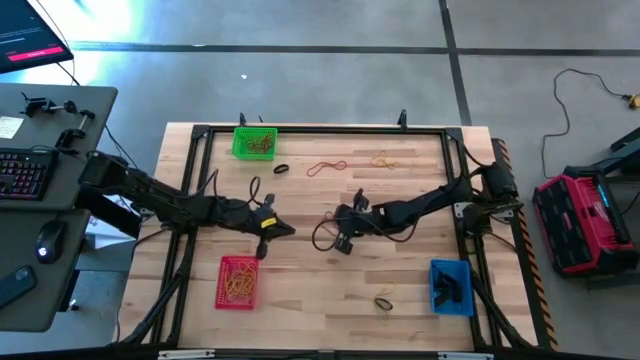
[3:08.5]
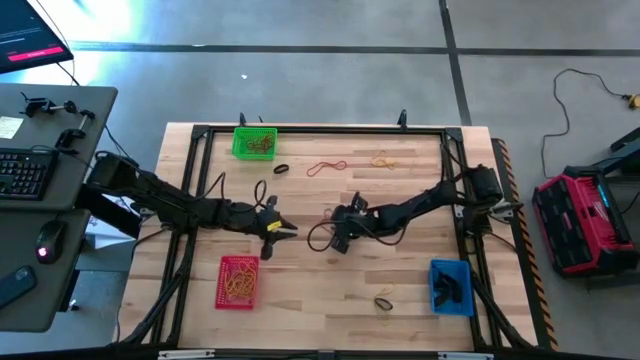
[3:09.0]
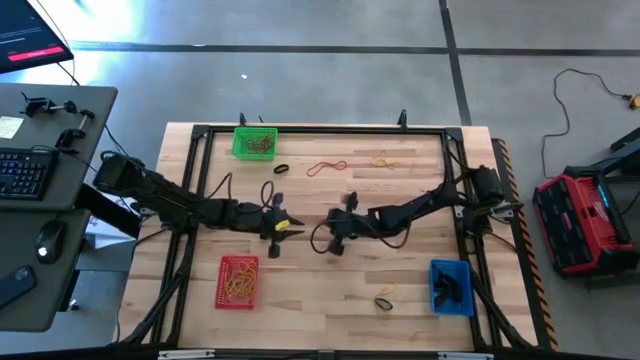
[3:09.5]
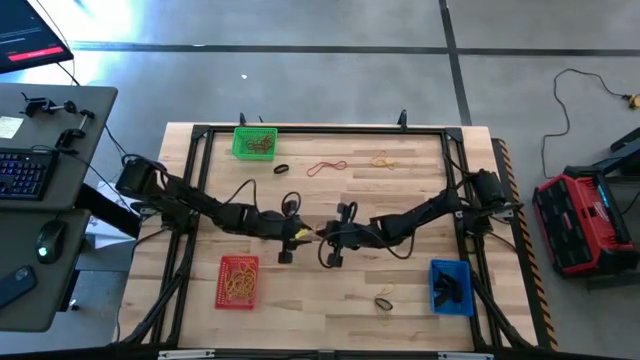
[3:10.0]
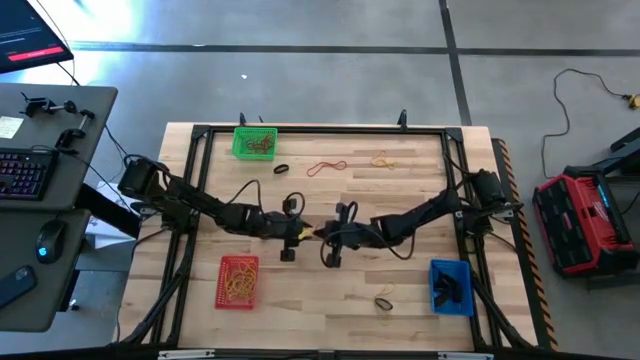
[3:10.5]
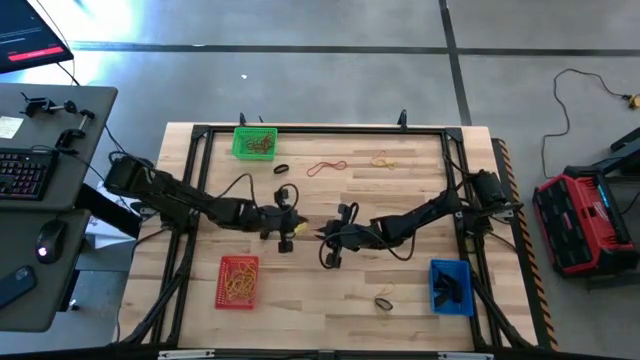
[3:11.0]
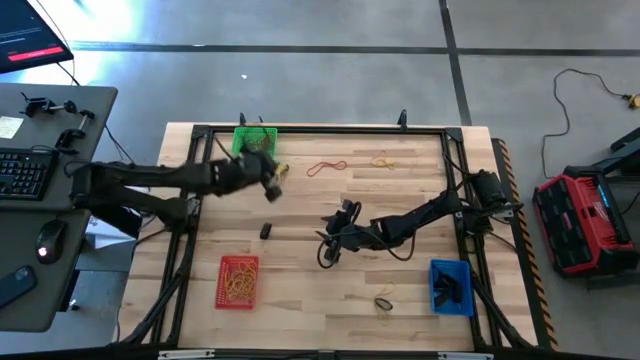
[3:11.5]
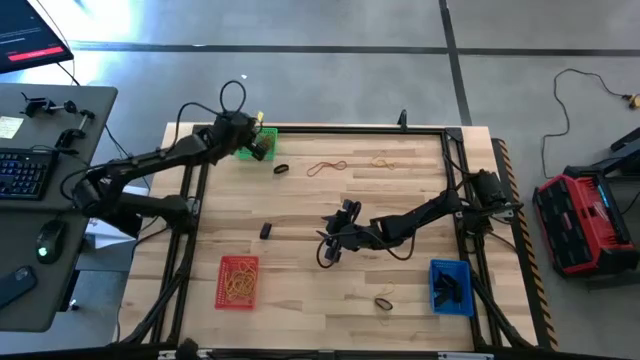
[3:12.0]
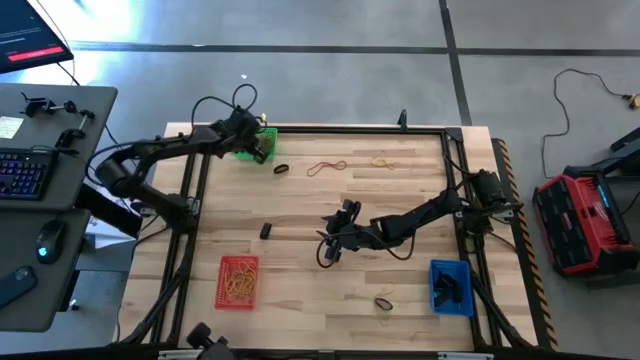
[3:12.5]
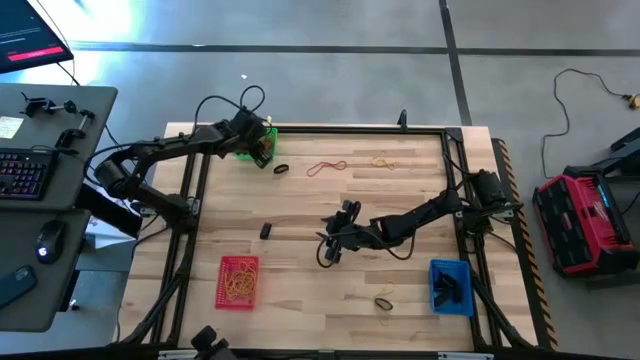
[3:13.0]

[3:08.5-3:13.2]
Task: Sort rubber bands into baskets
Put the red rubber band into the green bin

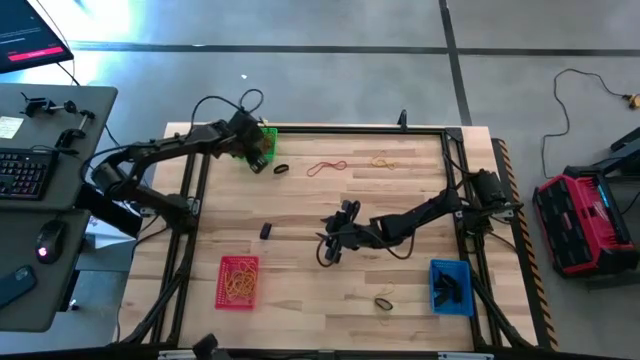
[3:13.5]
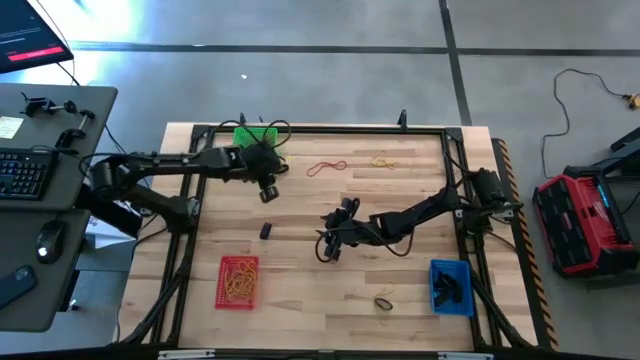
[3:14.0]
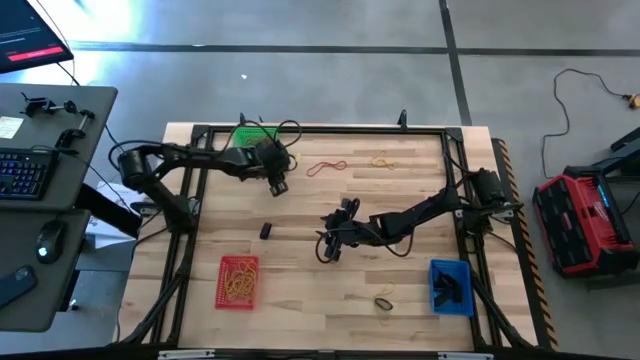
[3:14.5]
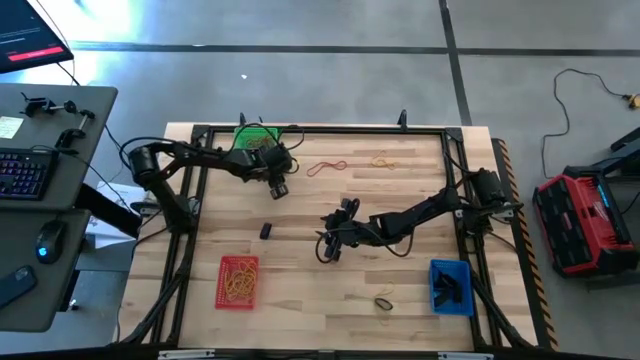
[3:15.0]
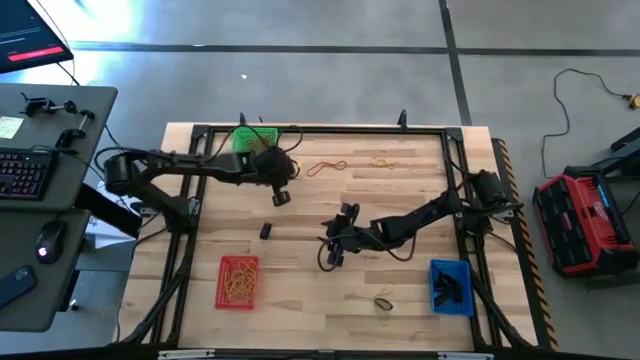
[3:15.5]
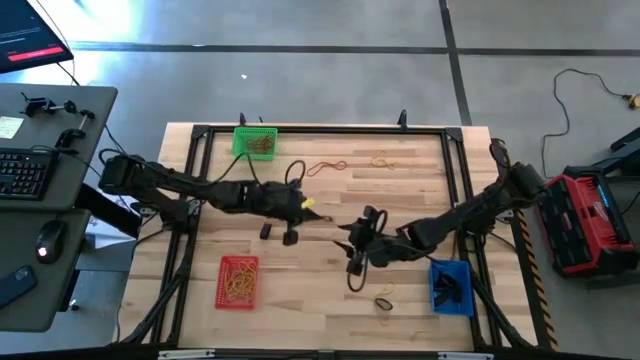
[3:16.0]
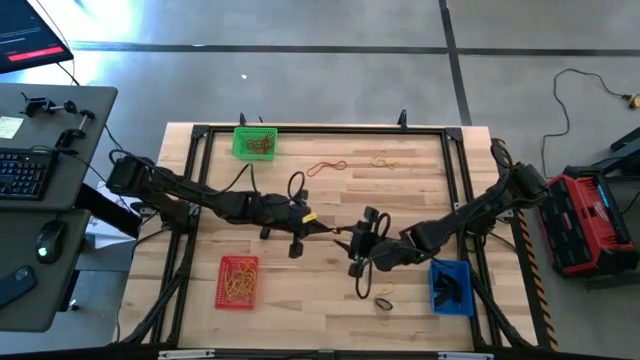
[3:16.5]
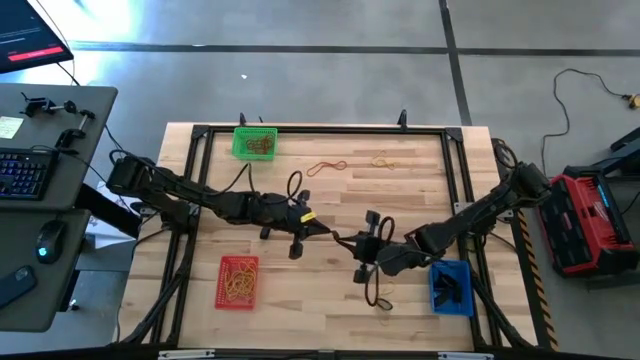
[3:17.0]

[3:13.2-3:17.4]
Put the black rubber band into the blue bin

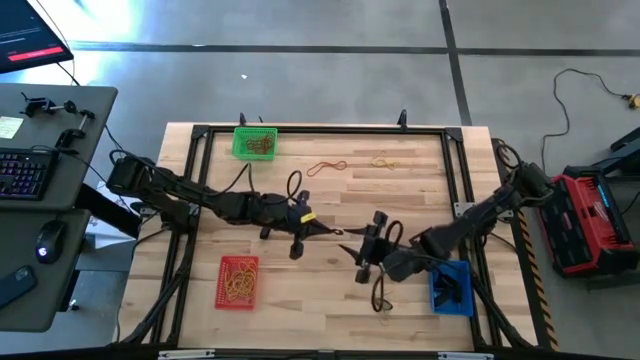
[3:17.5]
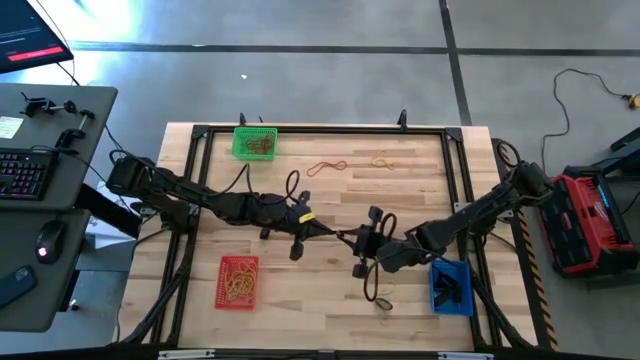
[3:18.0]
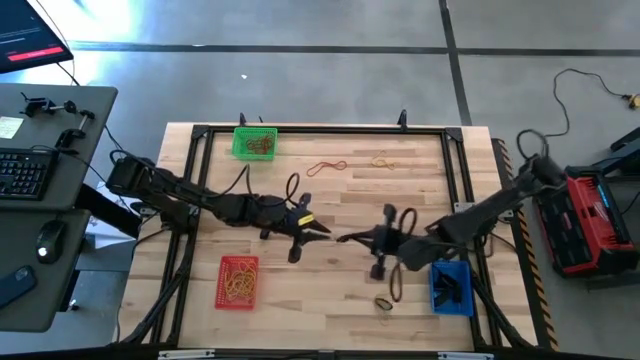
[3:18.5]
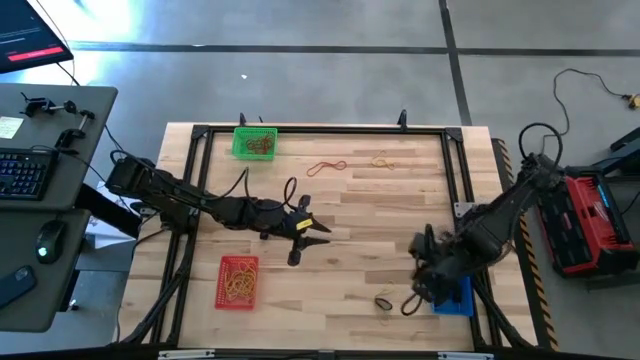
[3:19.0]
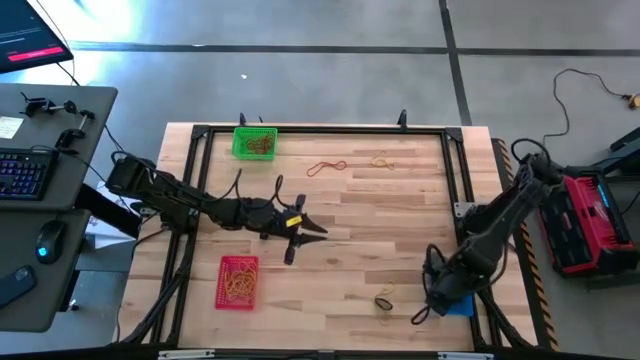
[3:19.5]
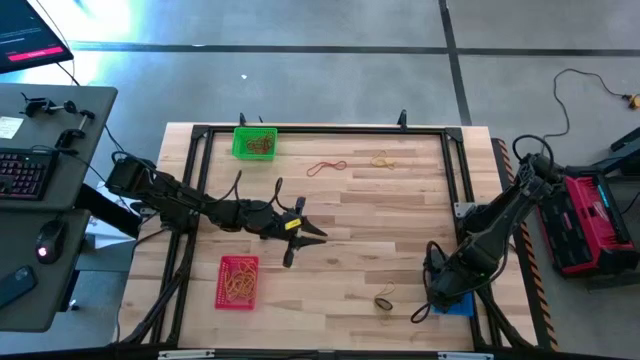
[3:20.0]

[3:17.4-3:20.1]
Put the black rubber band into the blue bin

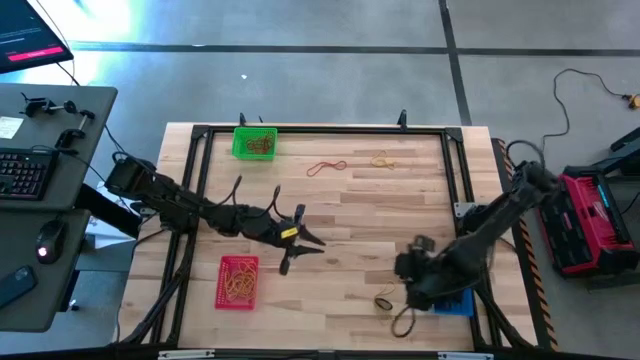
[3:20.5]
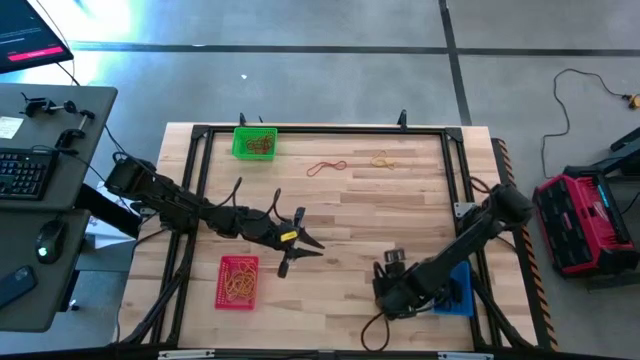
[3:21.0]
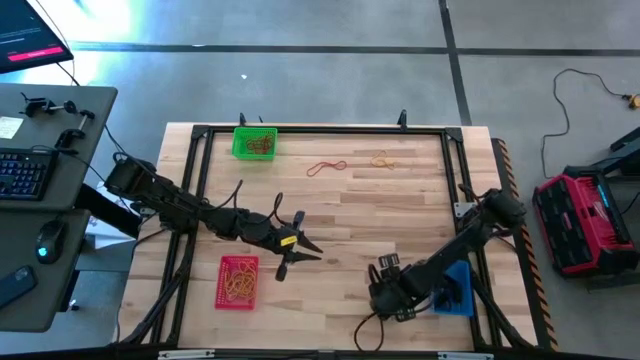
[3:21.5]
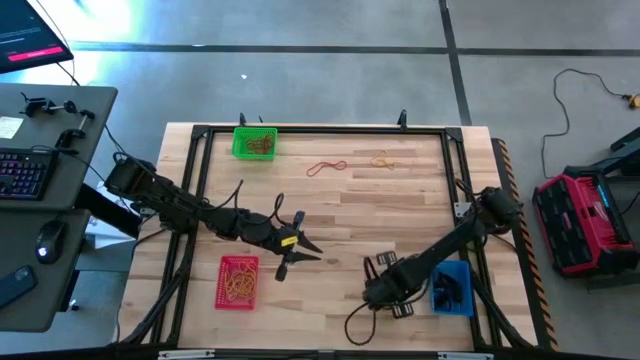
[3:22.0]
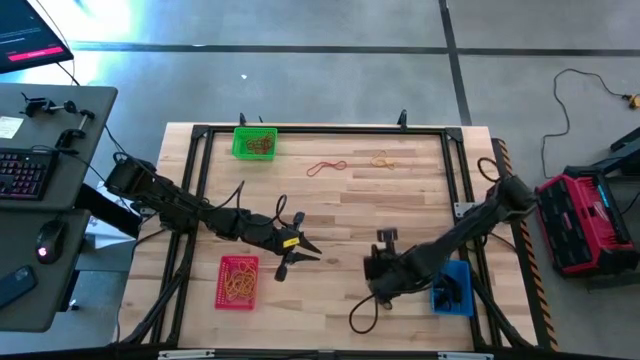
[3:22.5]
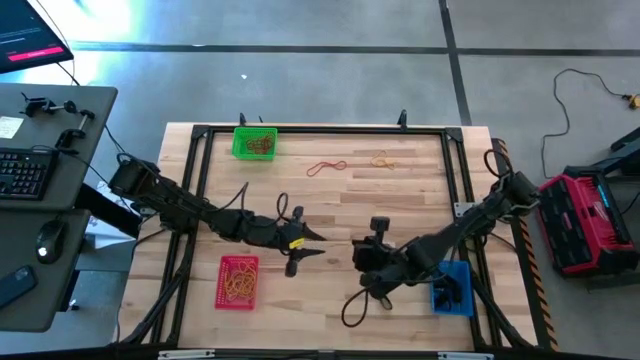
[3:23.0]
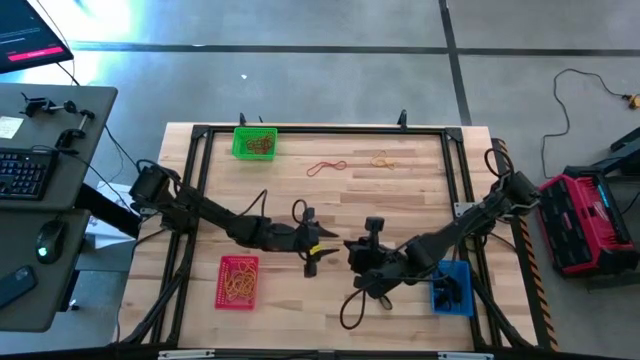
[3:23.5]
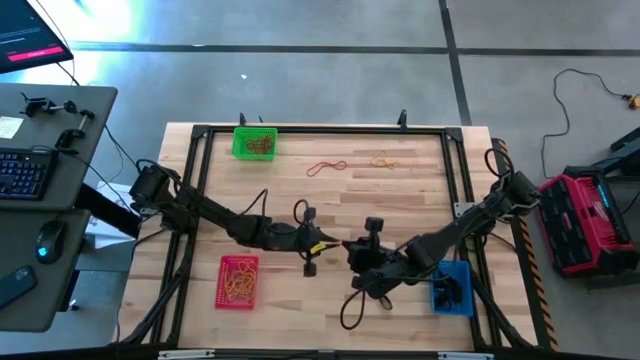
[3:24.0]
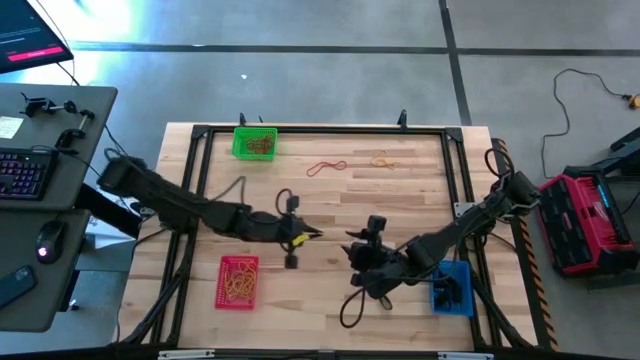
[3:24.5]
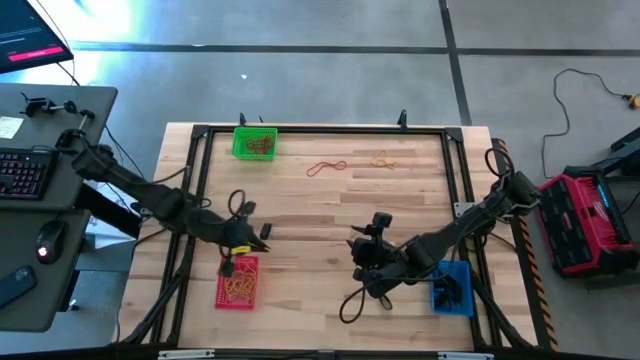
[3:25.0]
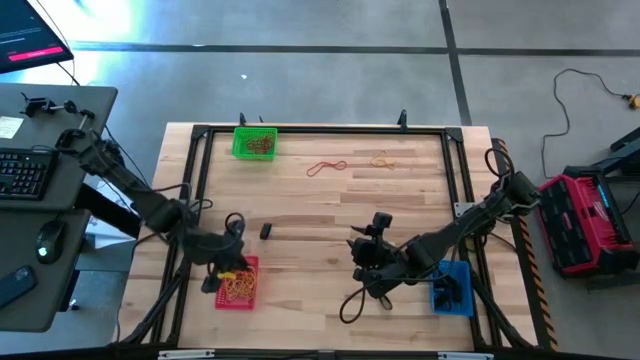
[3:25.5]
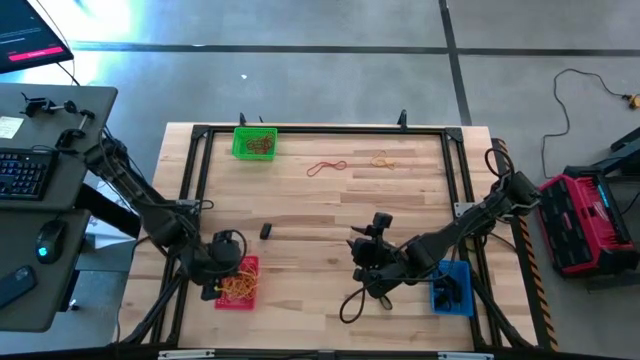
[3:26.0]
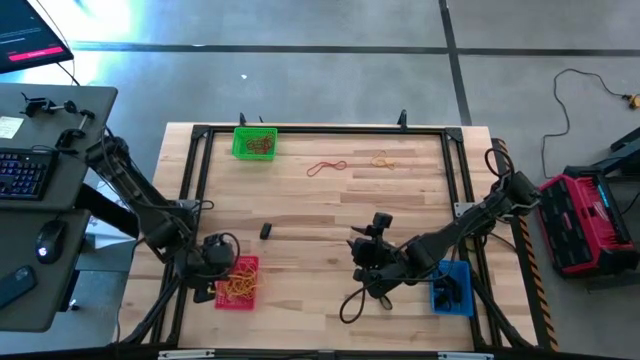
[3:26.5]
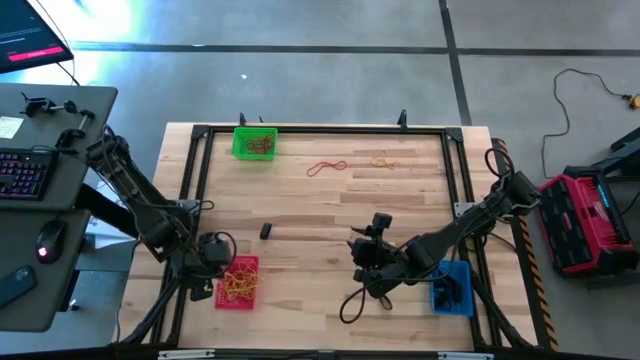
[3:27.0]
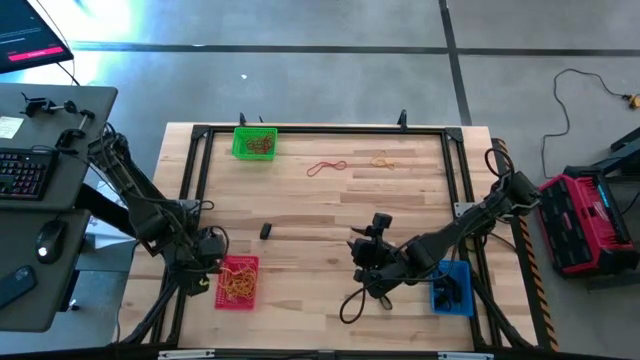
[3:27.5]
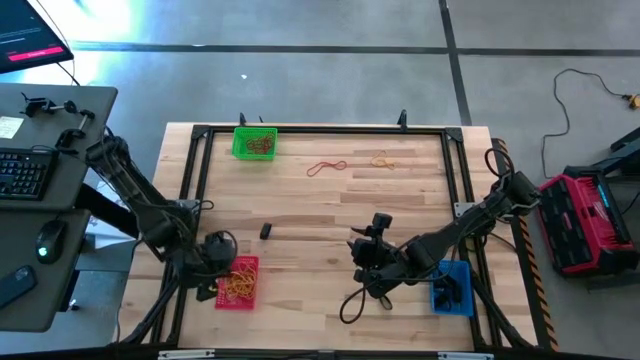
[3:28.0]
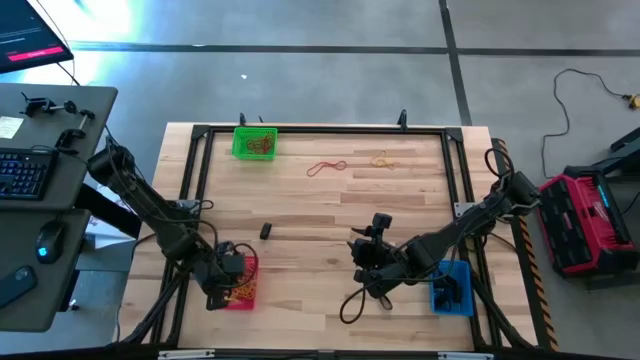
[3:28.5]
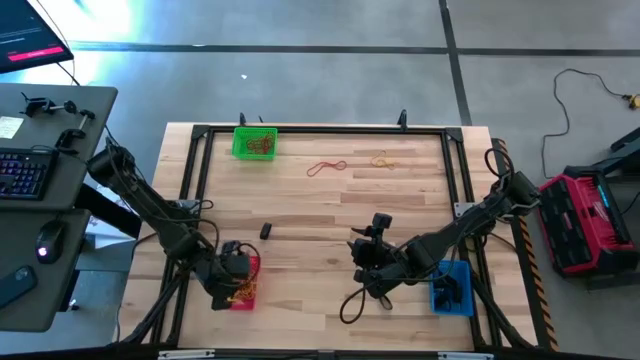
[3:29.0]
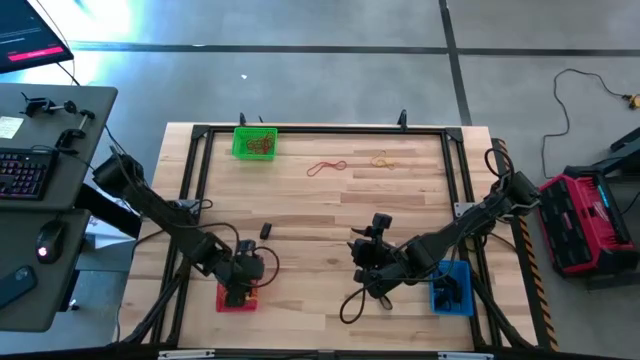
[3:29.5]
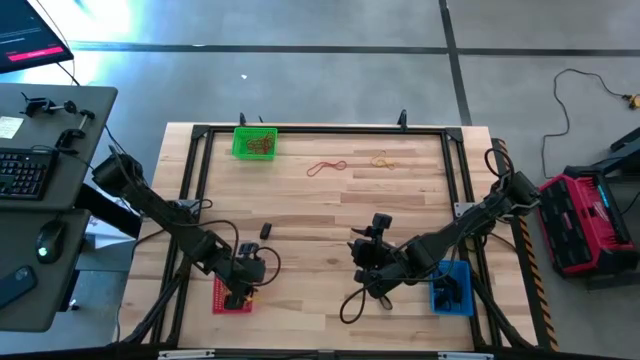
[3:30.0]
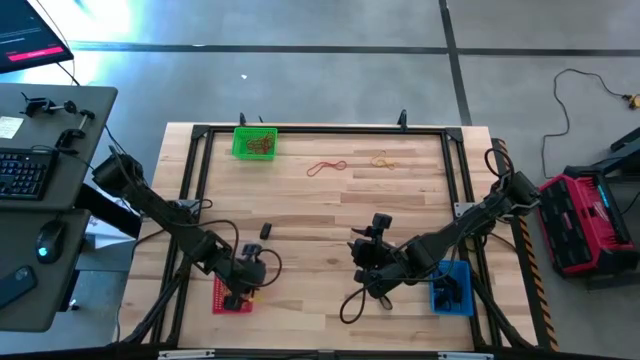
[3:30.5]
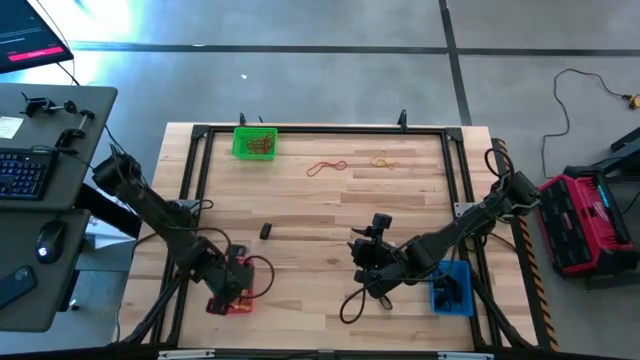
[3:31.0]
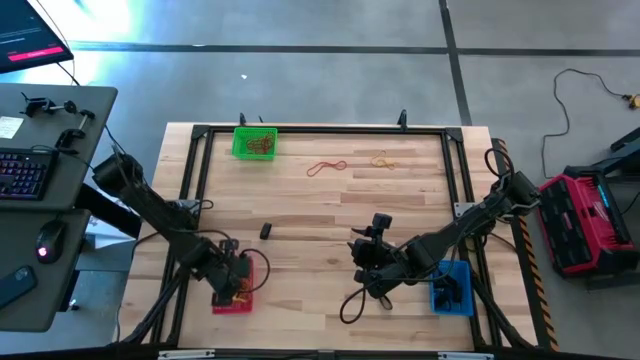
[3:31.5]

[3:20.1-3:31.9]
Put the yellow rubber band into the red bin
